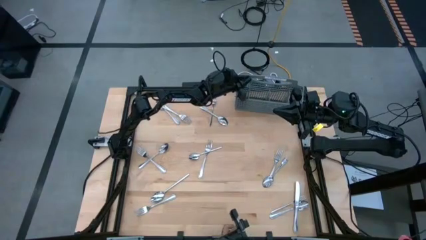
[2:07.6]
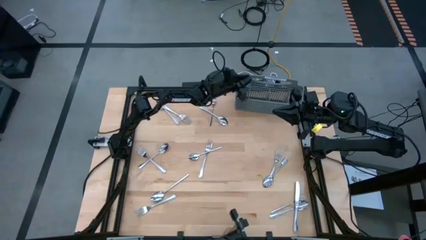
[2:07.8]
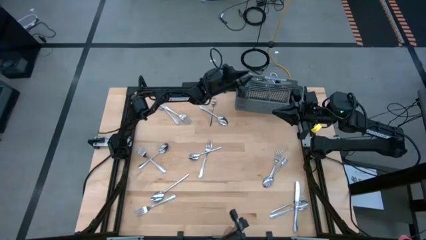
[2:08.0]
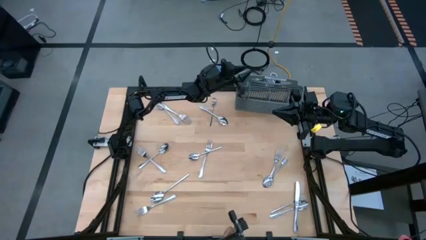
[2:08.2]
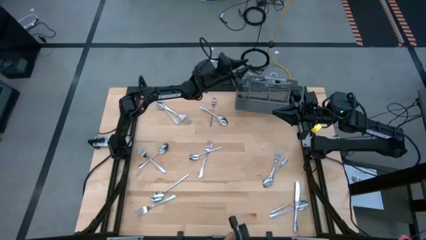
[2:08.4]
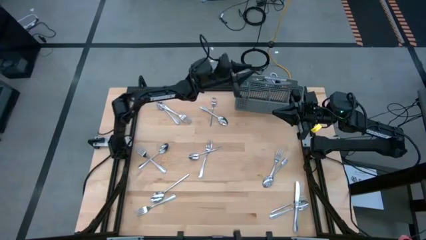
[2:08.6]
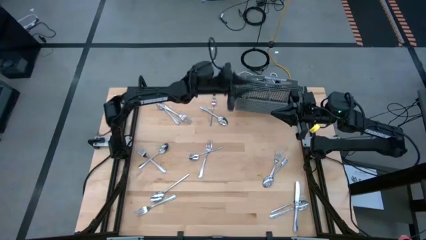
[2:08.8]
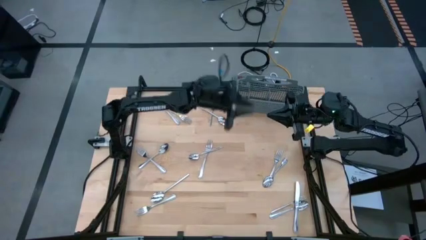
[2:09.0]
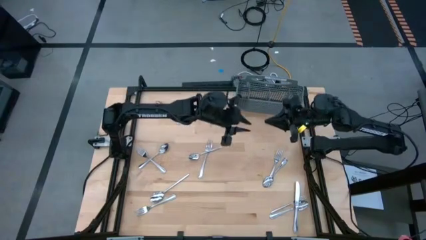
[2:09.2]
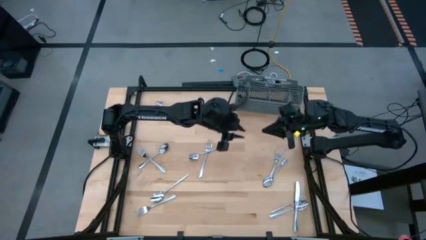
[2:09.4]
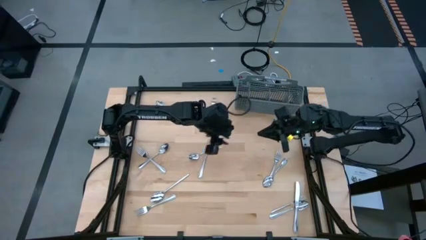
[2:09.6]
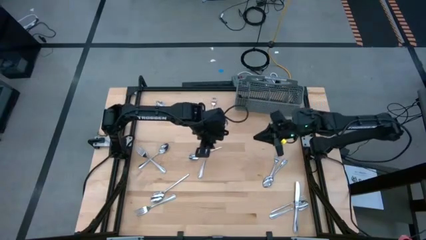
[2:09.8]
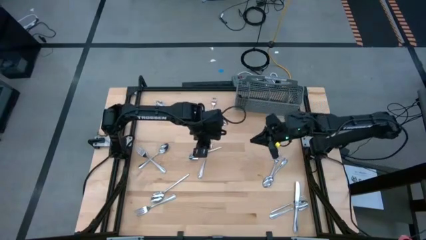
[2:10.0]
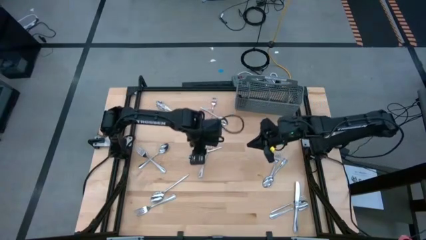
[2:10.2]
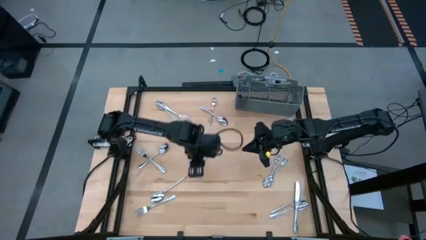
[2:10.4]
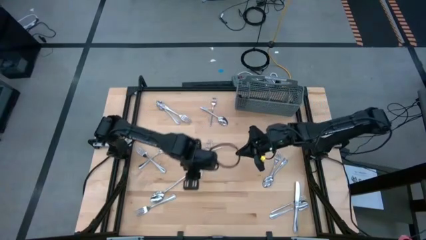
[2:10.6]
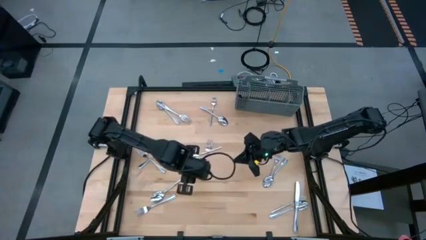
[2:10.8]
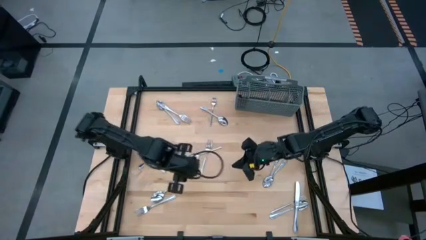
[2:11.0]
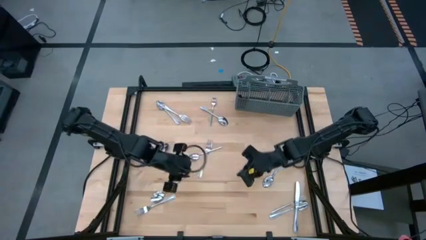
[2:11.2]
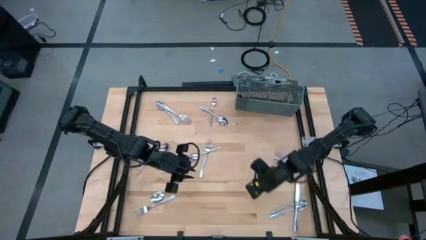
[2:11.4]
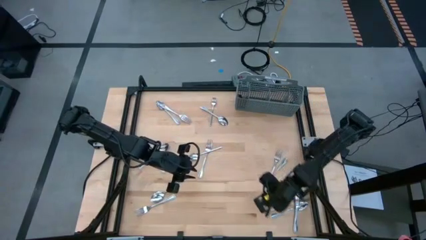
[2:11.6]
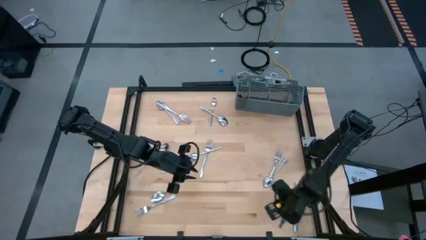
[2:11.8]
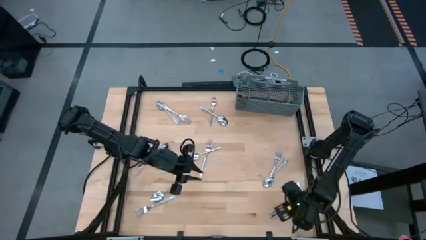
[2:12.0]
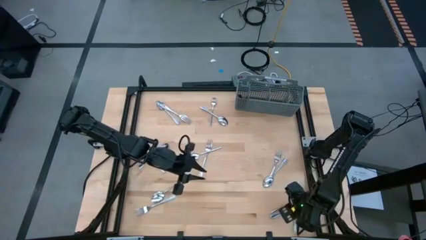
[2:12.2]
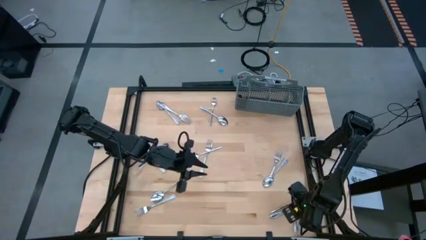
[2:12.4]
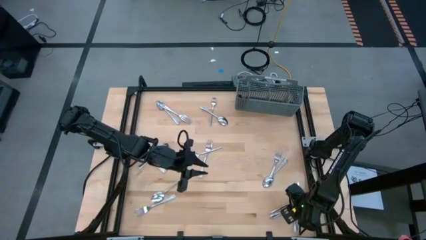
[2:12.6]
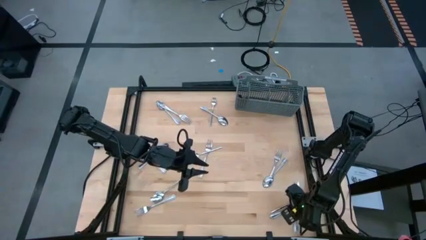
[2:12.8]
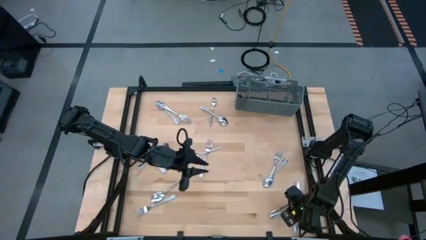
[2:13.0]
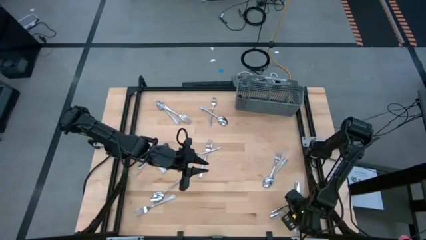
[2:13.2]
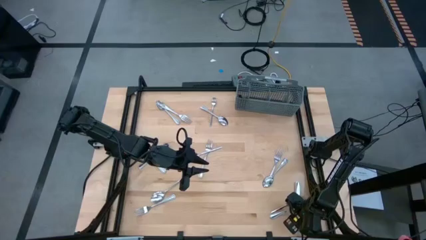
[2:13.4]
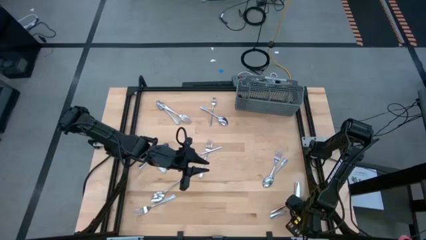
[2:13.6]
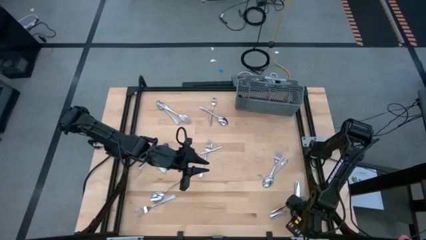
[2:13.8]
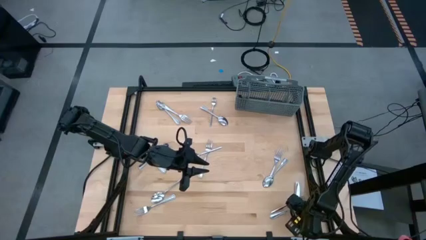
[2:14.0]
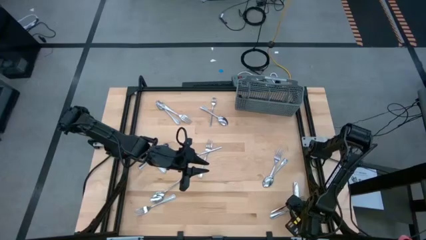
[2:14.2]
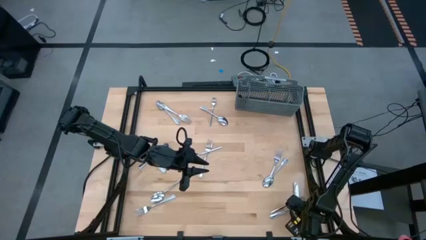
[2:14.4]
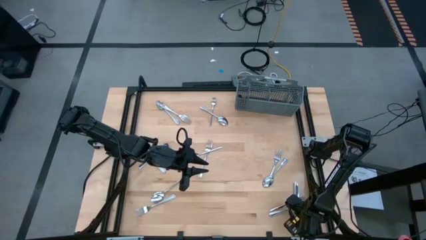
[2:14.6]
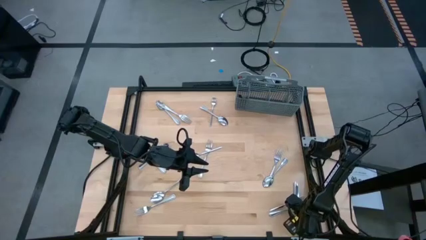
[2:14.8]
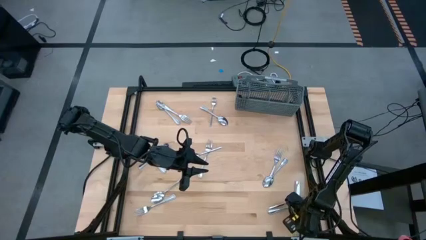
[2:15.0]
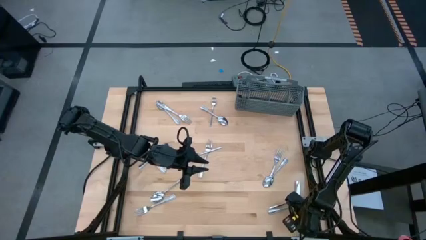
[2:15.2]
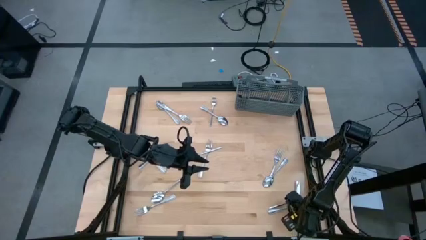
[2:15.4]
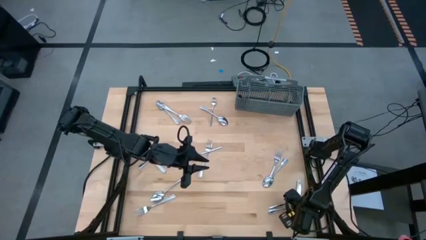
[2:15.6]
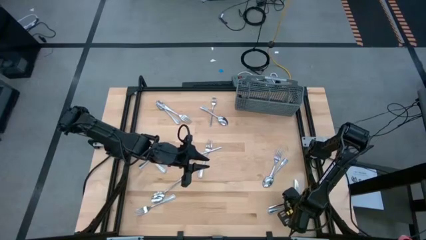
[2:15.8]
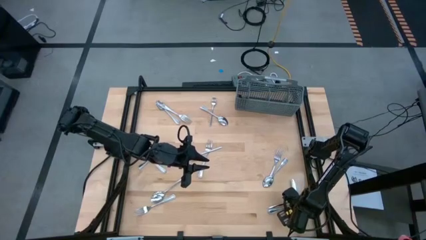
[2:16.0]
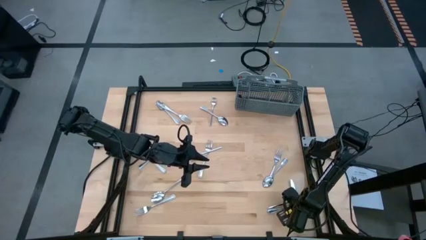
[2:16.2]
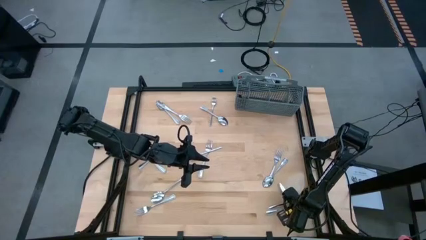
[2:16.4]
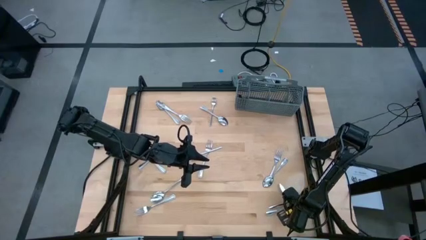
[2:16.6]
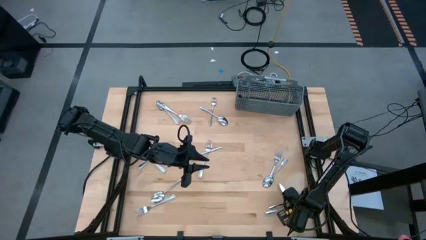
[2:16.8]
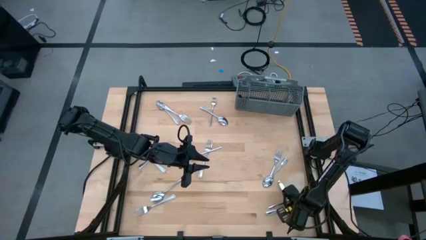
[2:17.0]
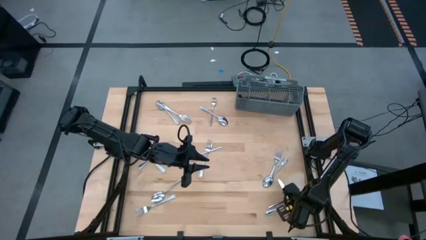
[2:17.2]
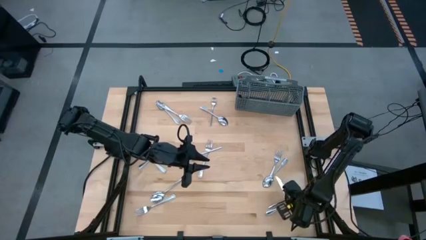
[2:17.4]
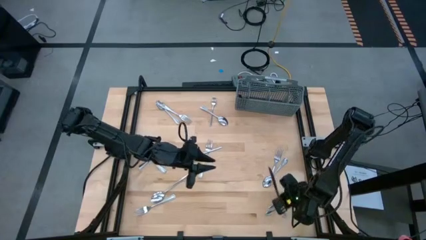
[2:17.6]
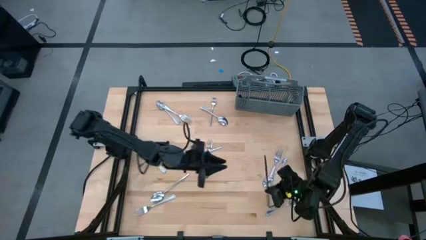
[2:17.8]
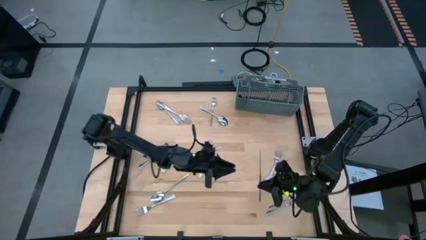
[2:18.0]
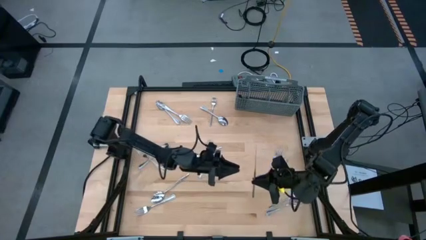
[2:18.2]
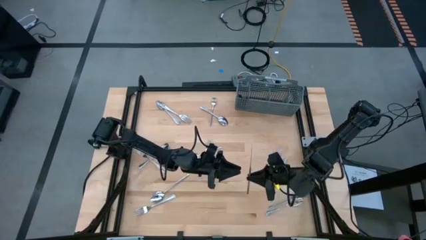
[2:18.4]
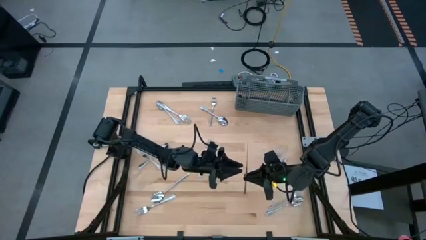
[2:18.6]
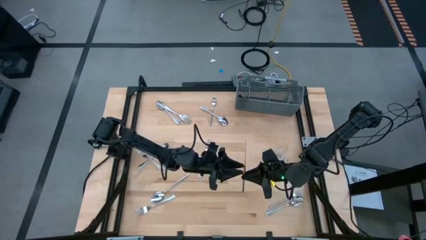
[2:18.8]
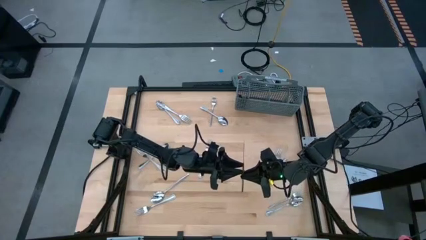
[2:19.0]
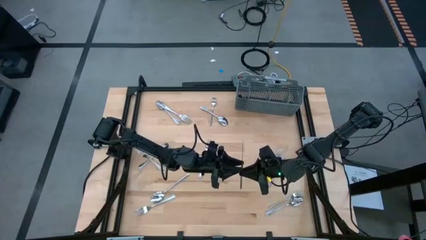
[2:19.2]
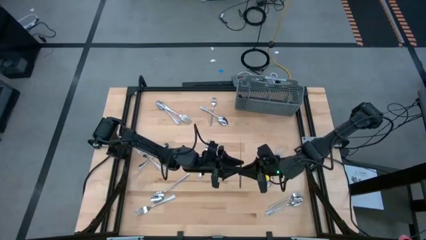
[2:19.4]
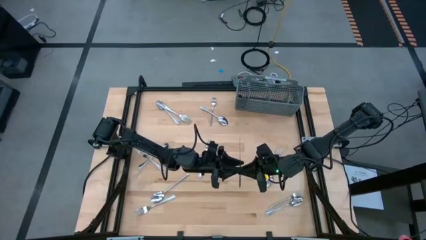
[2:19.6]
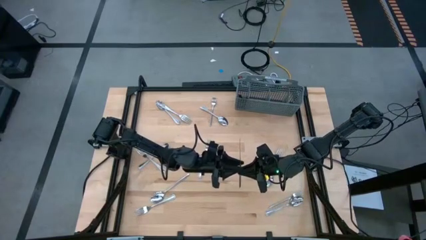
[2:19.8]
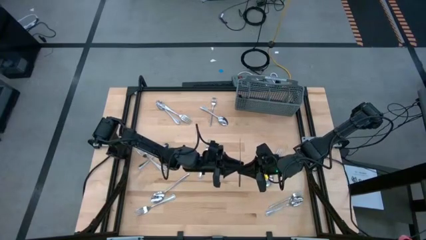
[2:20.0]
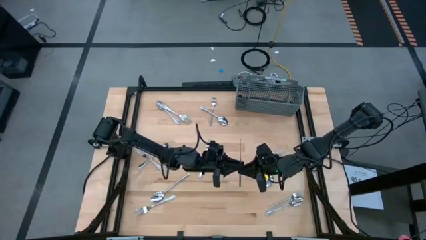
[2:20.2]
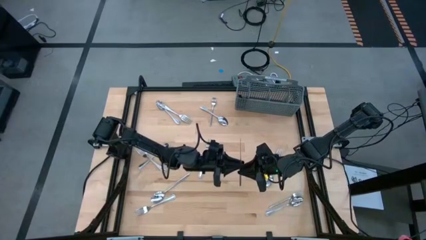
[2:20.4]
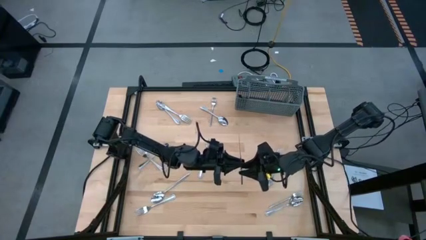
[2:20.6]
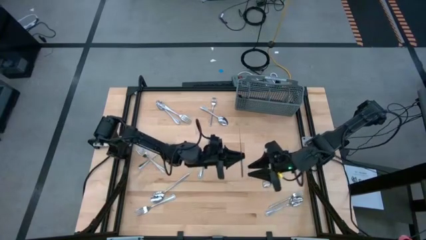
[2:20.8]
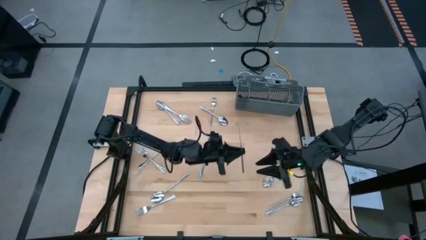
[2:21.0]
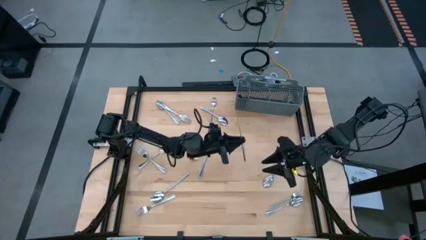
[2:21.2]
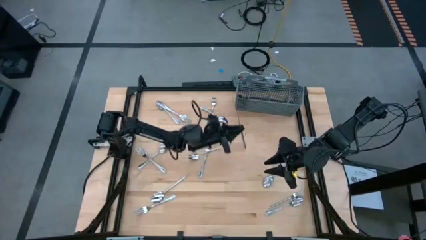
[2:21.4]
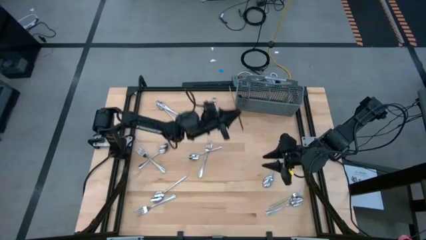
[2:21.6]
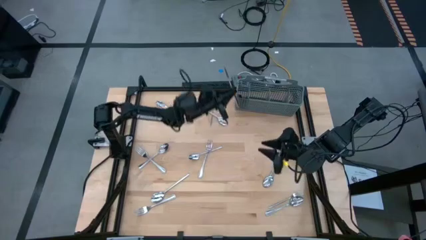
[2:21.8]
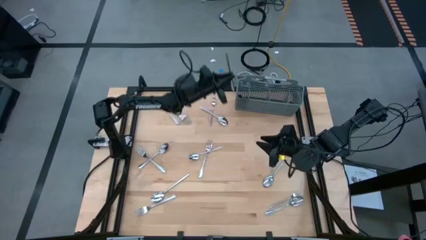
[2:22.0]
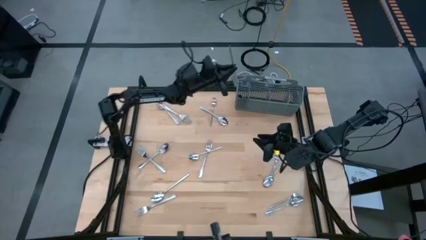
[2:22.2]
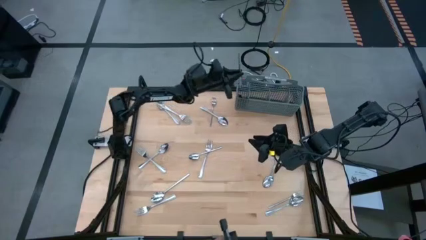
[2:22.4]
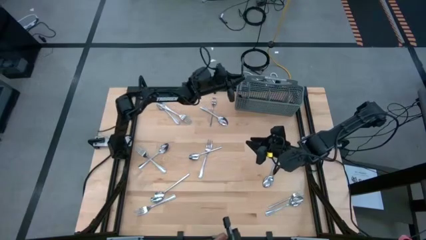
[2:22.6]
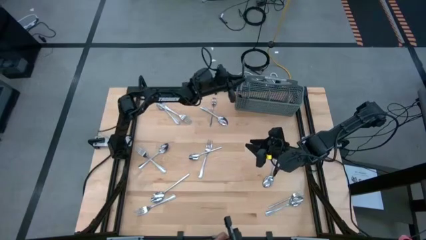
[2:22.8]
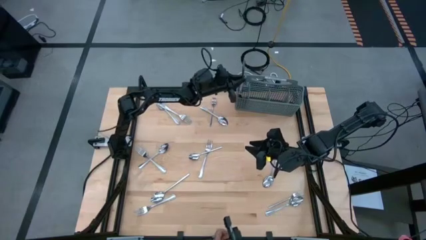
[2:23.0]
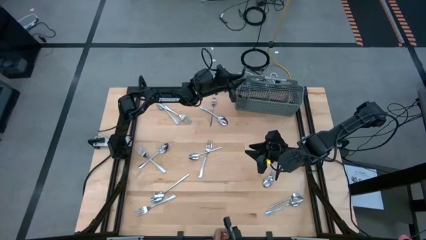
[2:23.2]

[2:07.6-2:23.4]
Task: Sort silverware
Put the silver knife into the silverware basket

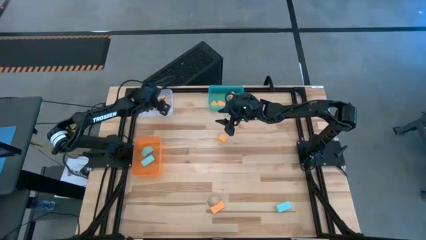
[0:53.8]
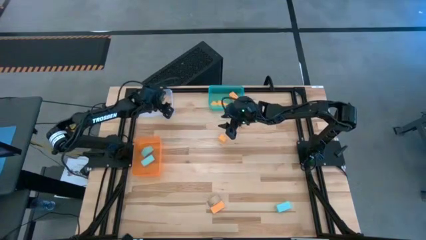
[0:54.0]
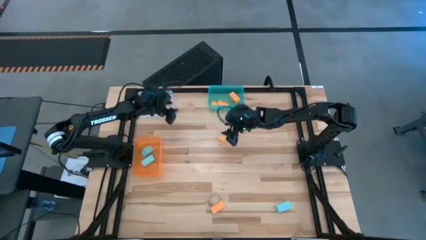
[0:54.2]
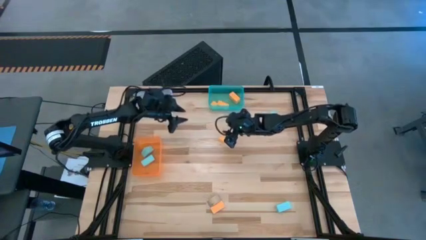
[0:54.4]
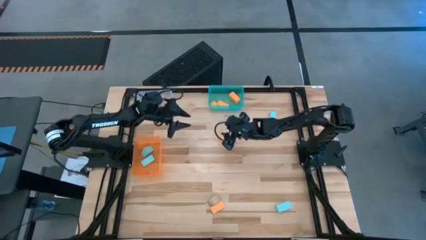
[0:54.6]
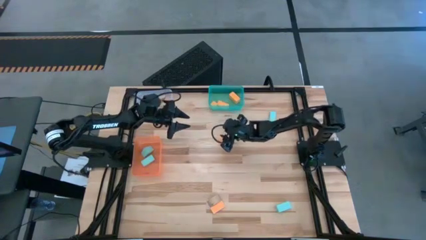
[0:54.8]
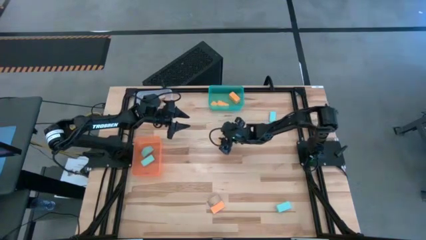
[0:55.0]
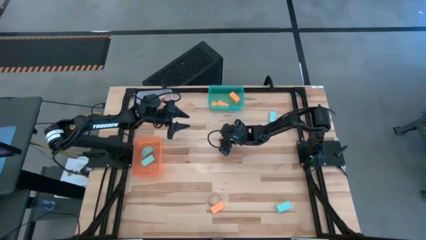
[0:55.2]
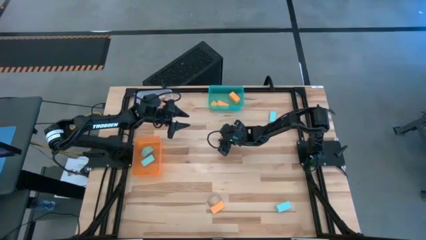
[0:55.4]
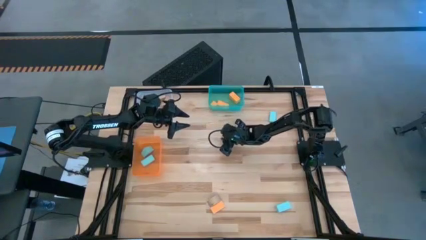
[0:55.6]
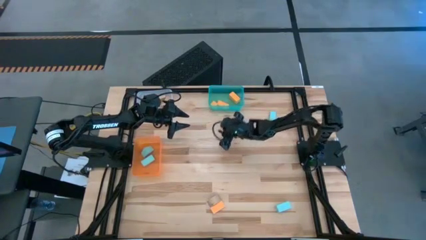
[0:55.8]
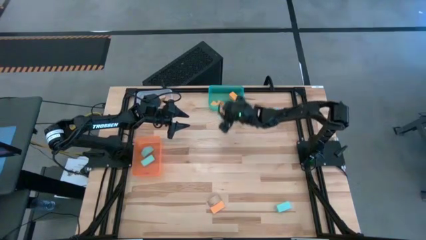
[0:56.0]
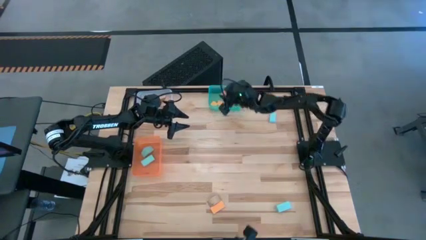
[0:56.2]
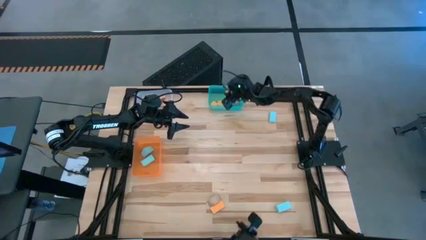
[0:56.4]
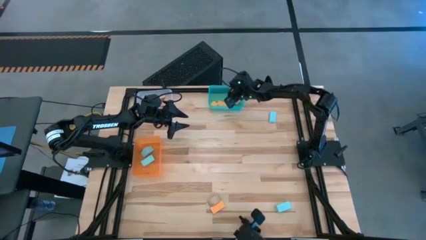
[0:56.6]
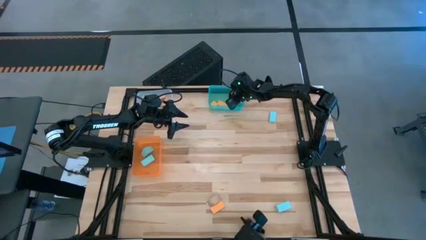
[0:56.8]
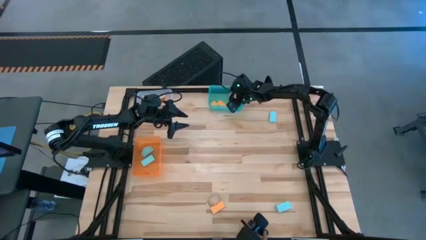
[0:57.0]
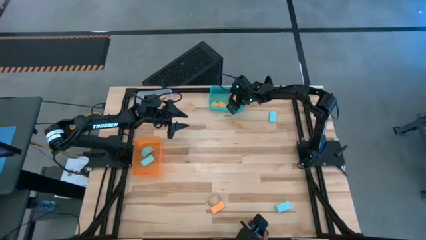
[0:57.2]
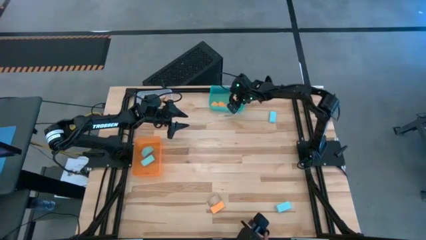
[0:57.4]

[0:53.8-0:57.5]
Task: Sort & place blocks by color
Put the yellow block into the green bin
